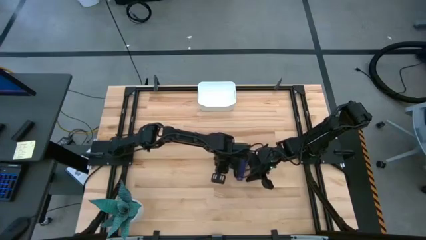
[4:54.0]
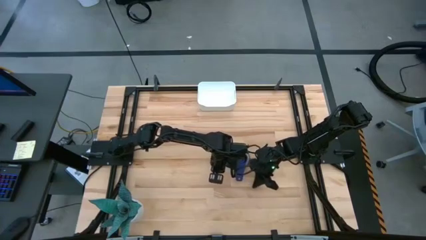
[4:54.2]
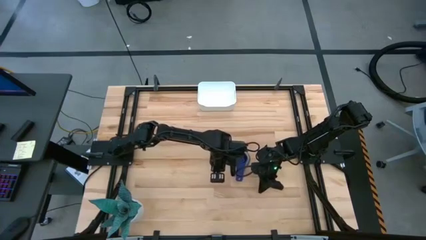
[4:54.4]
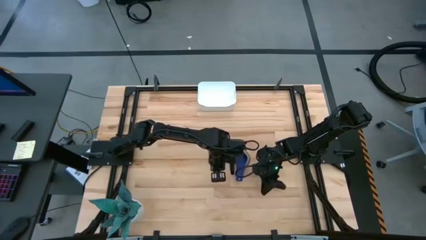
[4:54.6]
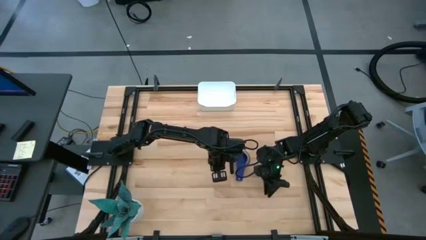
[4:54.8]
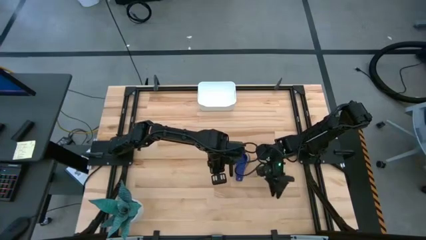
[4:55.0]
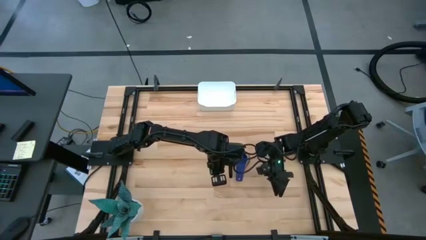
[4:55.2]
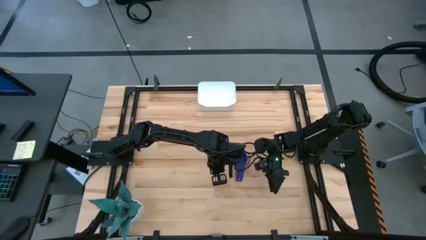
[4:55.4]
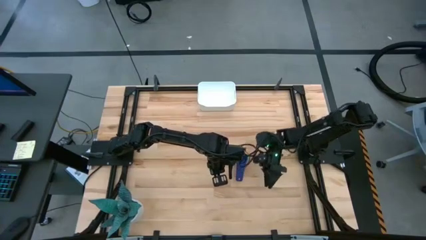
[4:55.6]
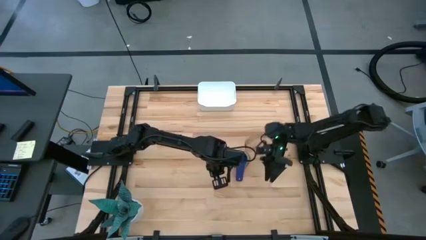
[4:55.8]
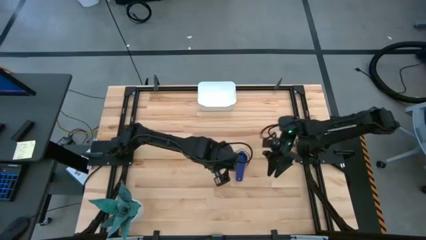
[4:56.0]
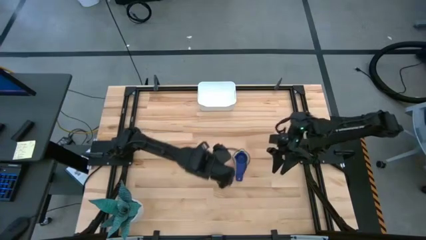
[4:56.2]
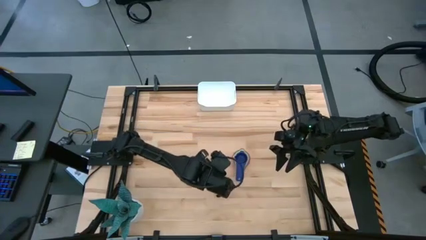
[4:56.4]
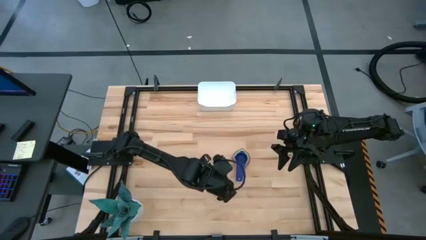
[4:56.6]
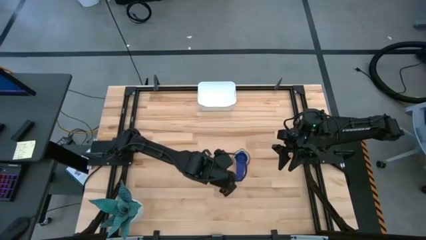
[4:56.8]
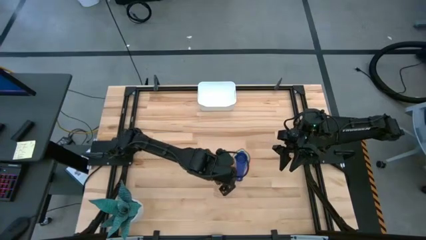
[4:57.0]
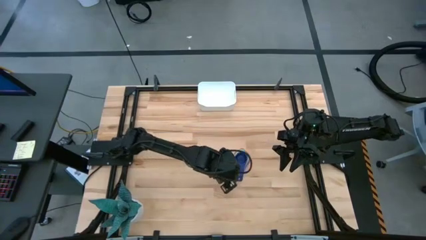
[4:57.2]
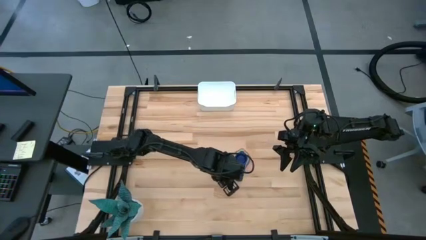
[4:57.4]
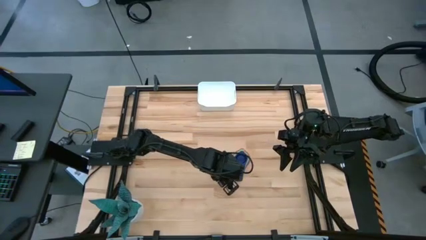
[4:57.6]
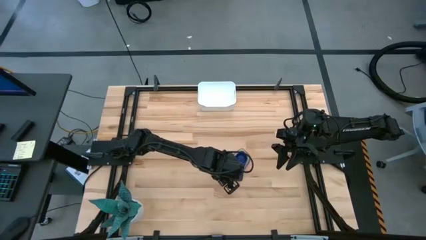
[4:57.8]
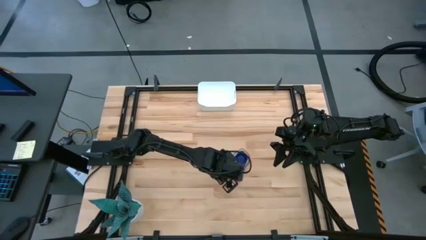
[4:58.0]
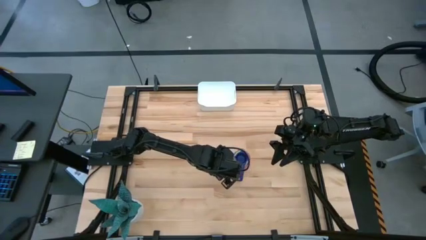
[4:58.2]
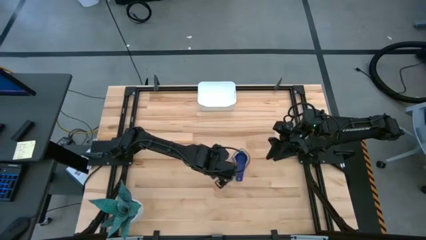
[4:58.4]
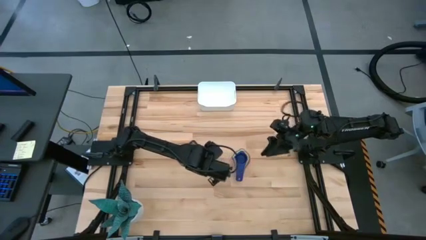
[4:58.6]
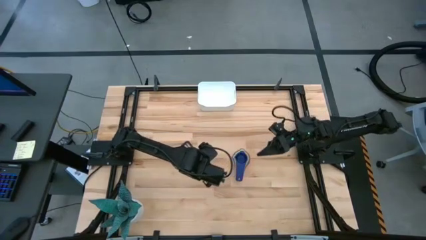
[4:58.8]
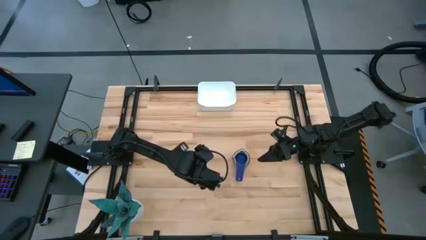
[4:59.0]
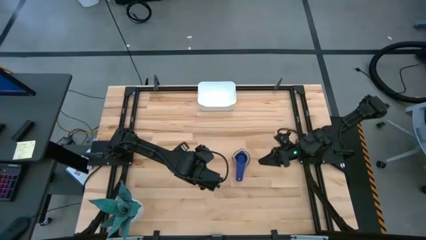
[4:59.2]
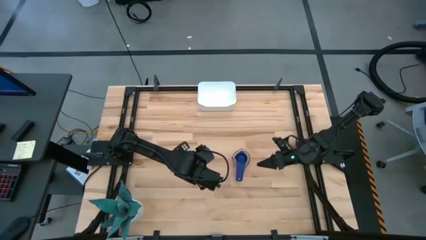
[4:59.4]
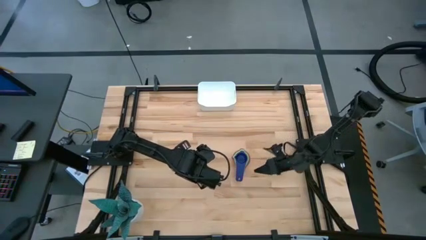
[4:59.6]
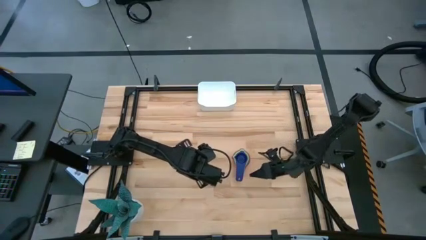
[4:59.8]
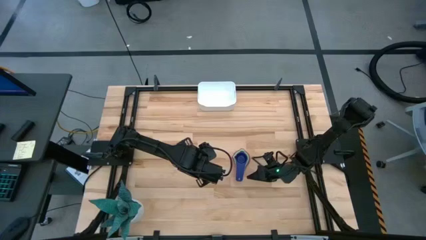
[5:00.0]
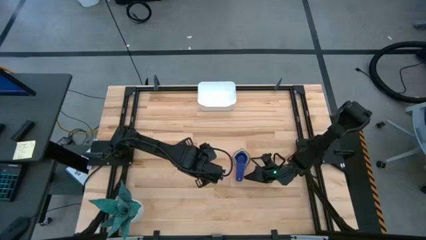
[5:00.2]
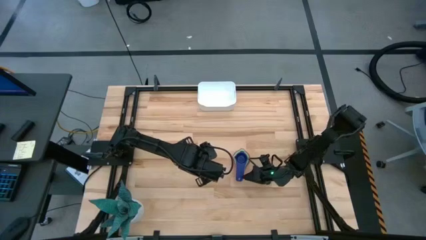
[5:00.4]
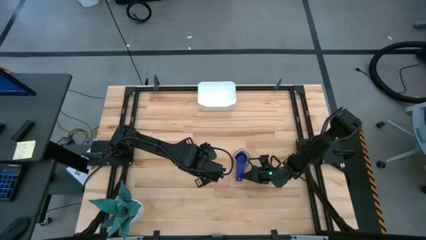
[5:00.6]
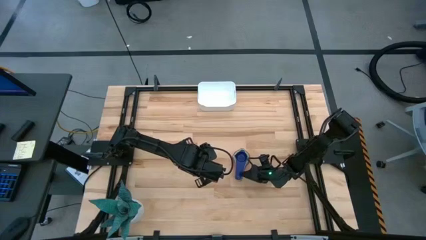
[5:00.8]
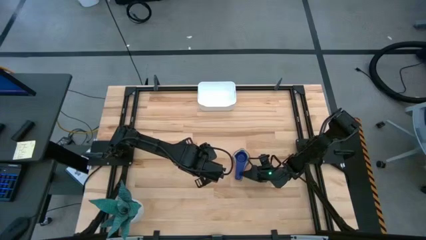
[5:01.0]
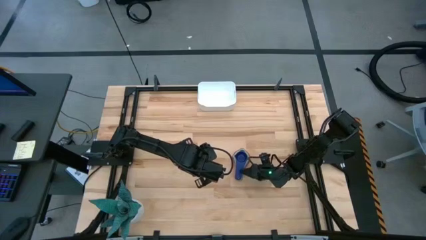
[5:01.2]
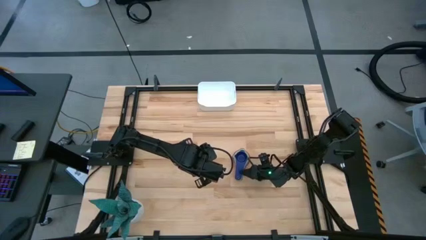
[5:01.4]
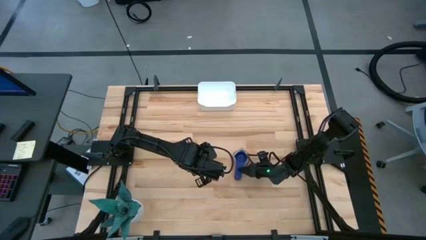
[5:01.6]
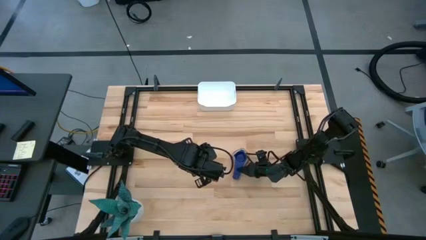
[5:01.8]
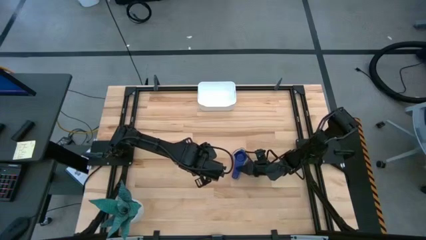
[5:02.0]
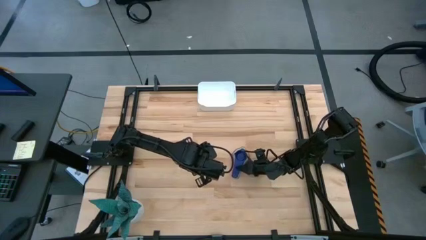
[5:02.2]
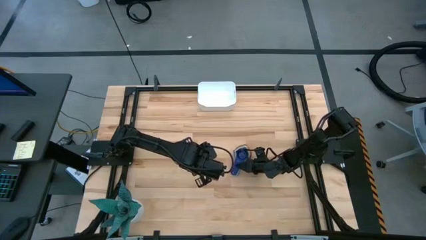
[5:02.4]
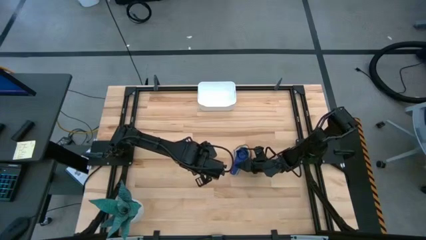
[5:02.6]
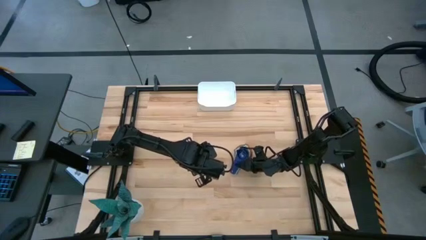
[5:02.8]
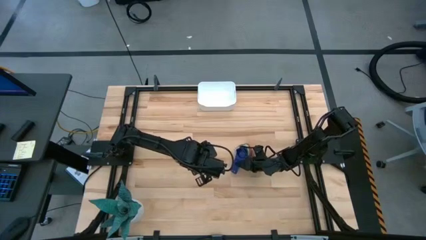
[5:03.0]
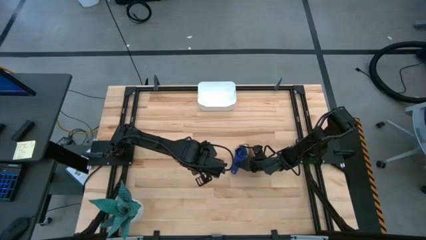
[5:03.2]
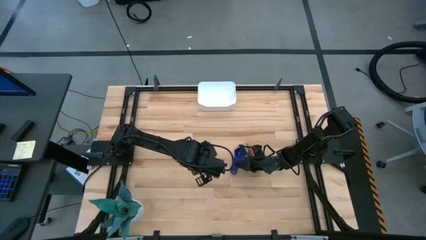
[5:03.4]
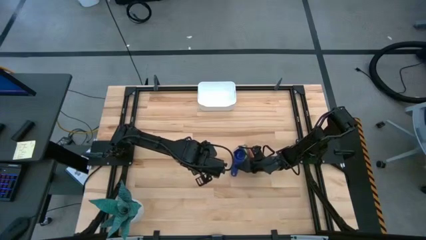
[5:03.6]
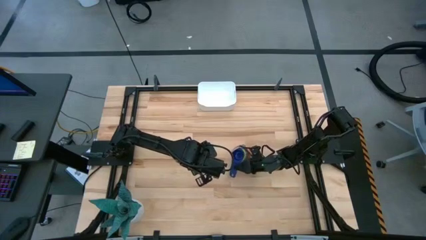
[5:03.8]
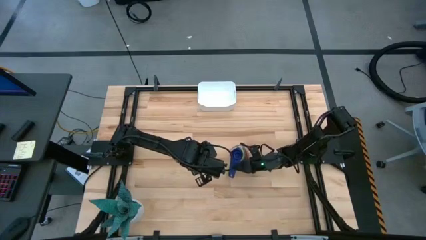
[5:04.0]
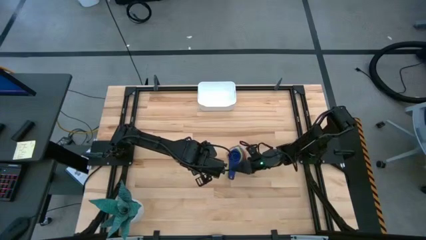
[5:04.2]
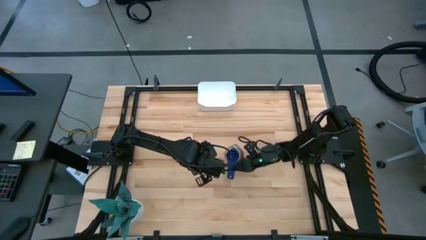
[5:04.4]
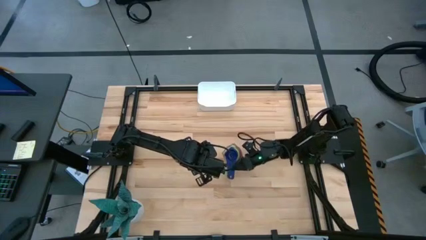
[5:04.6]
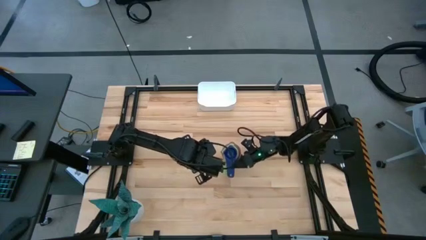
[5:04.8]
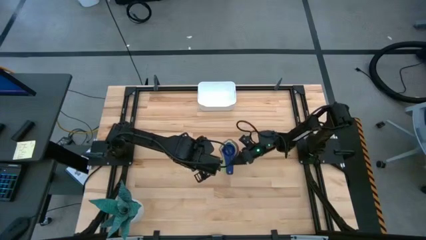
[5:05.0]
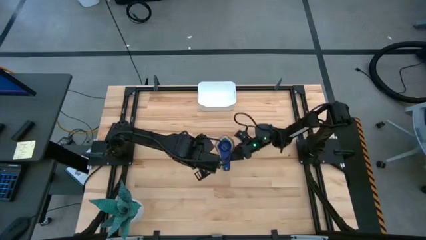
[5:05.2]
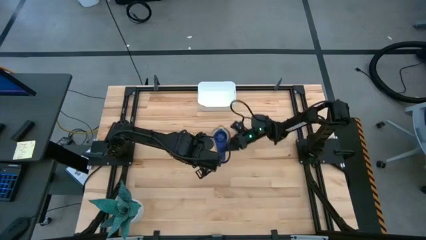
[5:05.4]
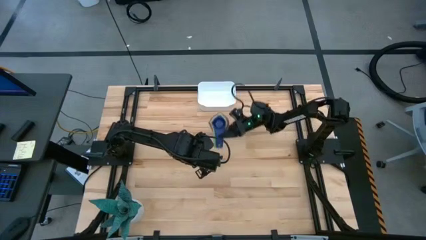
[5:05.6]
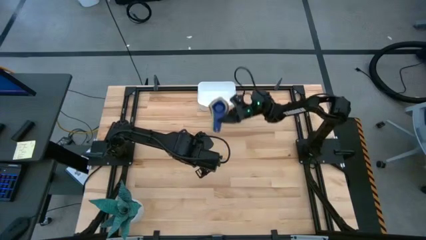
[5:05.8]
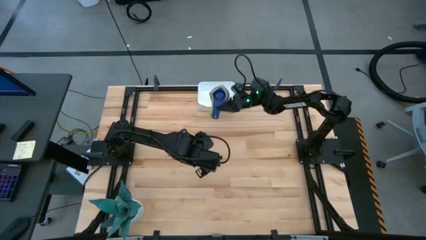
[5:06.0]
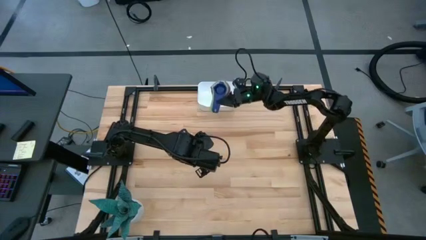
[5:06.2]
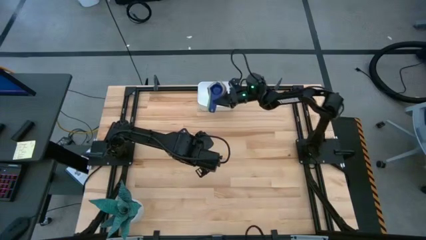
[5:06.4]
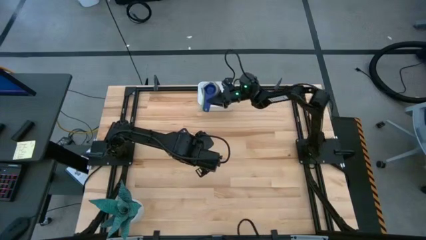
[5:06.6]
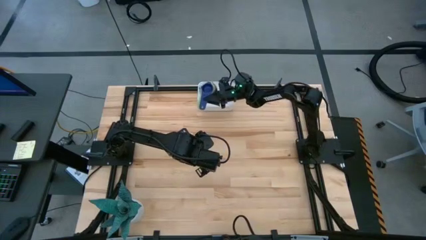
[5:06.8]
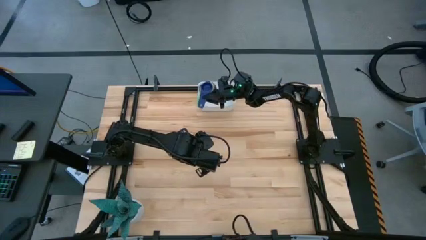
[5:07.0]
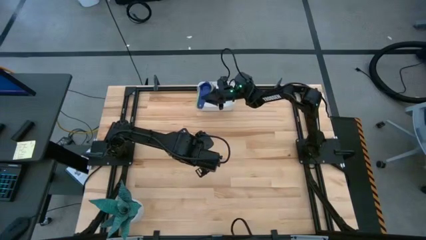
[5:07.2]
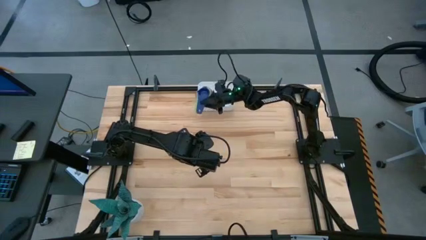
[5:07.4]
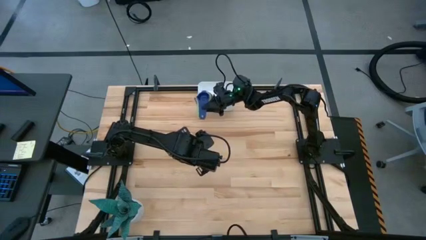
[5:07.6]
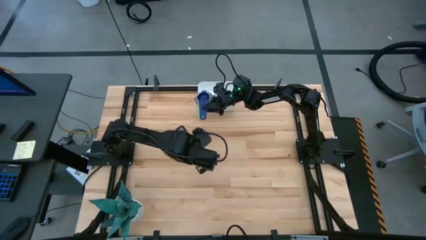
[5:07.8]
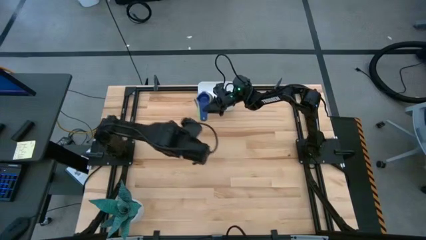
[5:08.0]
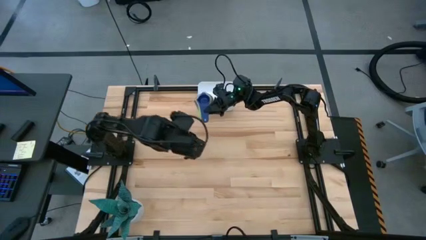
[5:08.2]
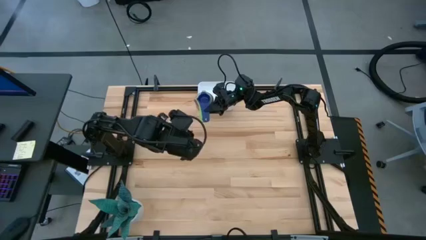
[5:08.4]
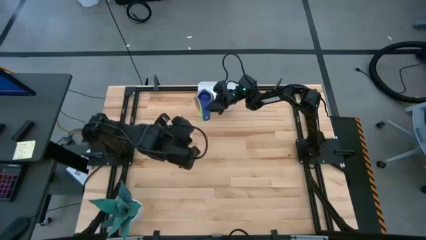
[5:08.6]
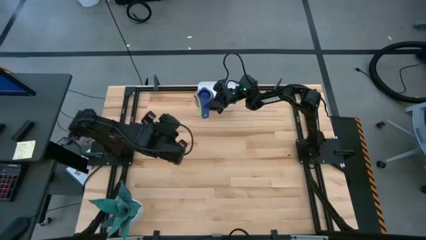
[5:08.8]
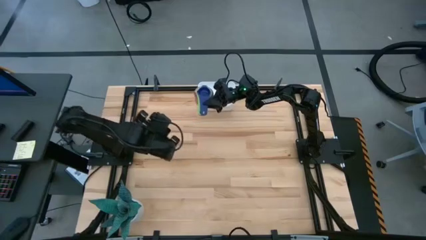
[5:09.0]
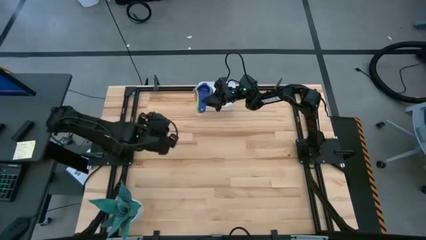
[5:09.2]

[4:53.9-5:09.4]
Task: Nest measuring cups in basket
Put the stacked measuring cups into the white bin
